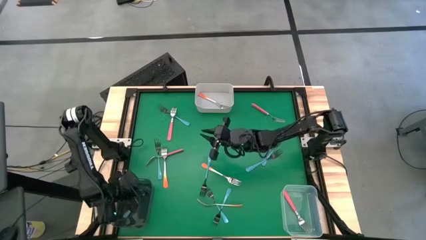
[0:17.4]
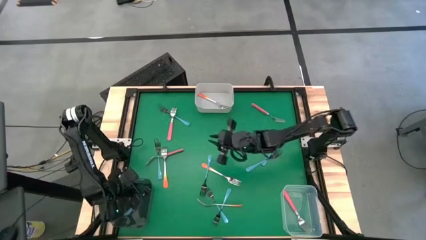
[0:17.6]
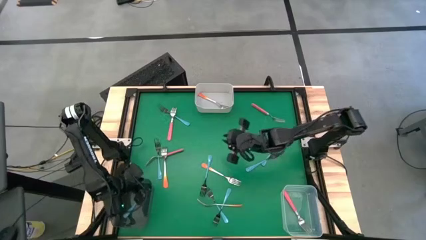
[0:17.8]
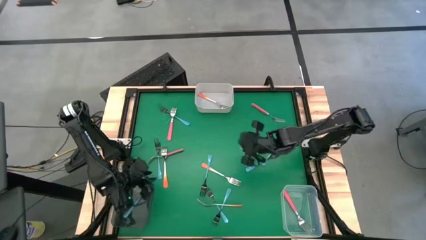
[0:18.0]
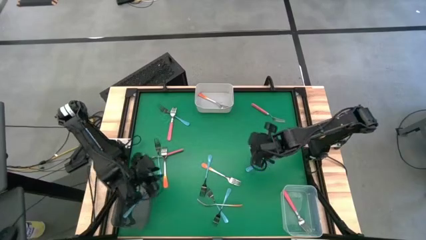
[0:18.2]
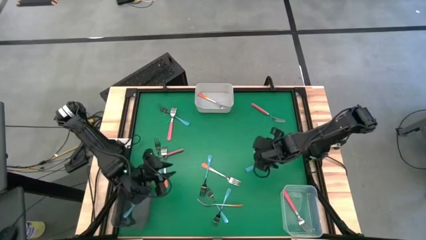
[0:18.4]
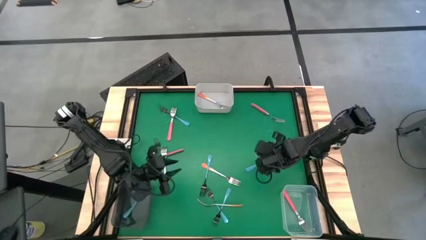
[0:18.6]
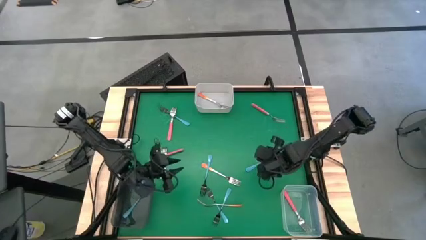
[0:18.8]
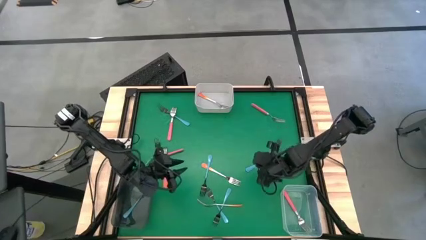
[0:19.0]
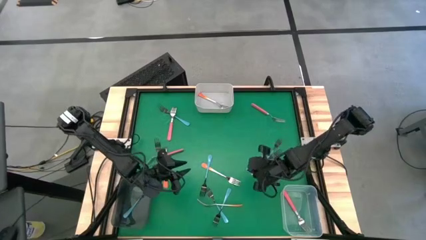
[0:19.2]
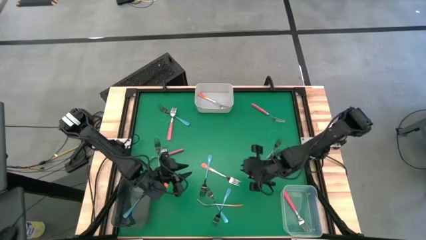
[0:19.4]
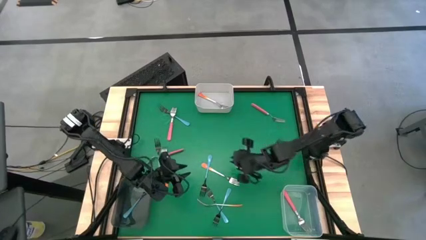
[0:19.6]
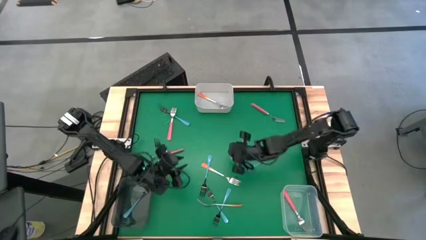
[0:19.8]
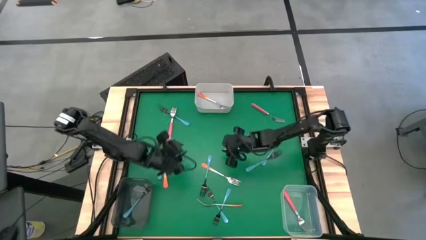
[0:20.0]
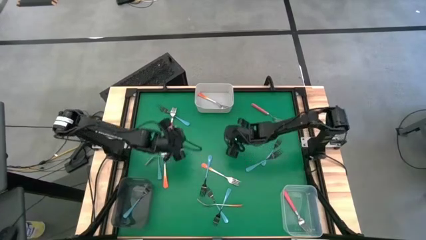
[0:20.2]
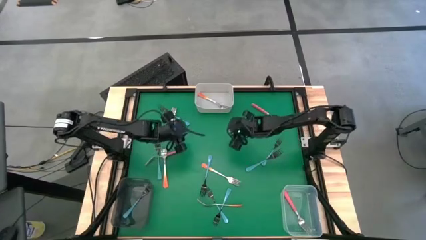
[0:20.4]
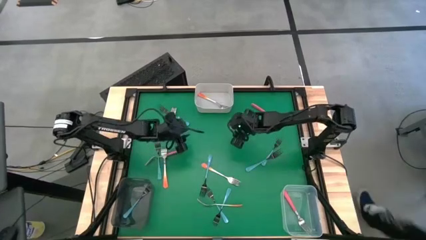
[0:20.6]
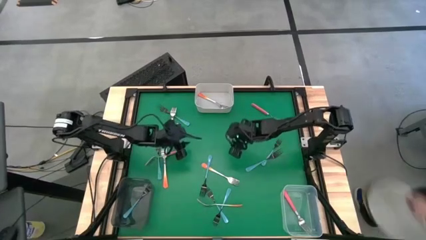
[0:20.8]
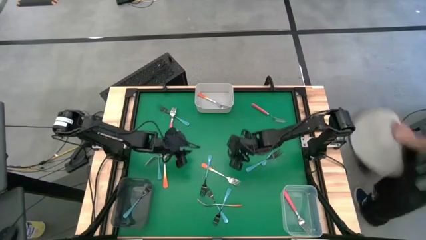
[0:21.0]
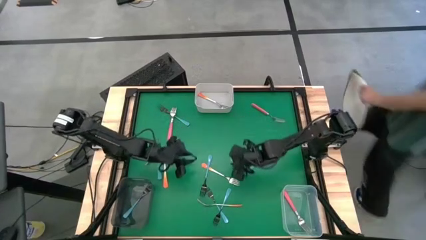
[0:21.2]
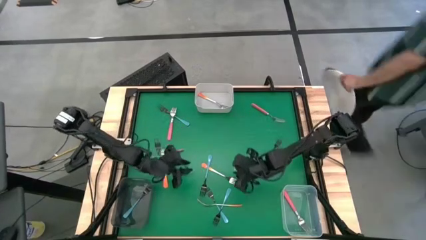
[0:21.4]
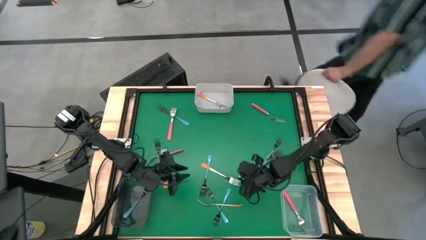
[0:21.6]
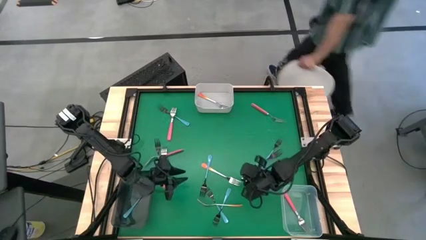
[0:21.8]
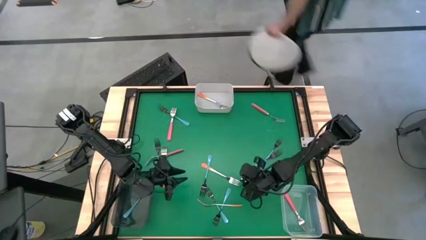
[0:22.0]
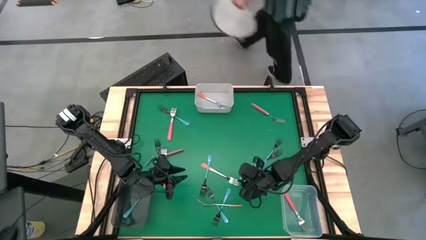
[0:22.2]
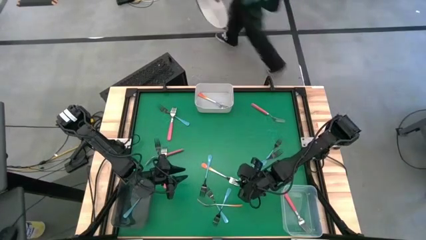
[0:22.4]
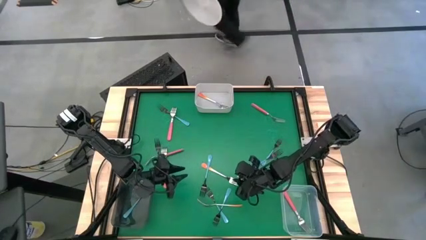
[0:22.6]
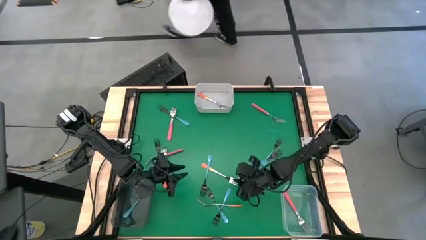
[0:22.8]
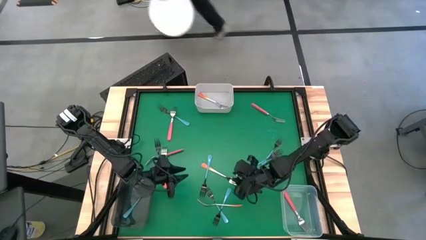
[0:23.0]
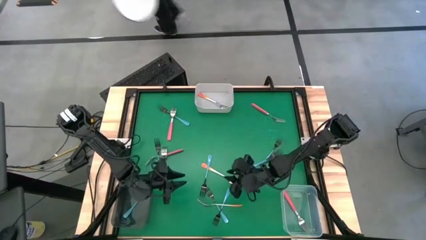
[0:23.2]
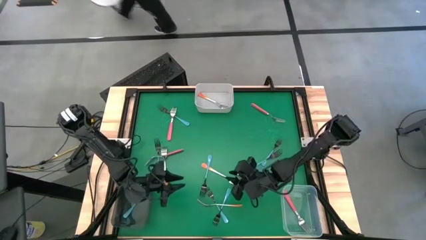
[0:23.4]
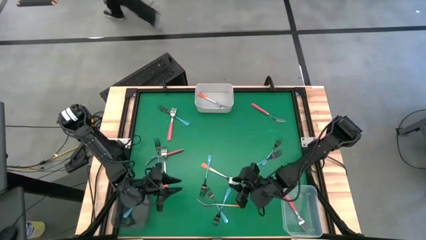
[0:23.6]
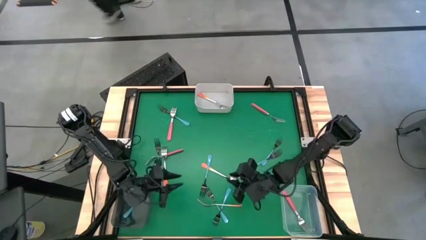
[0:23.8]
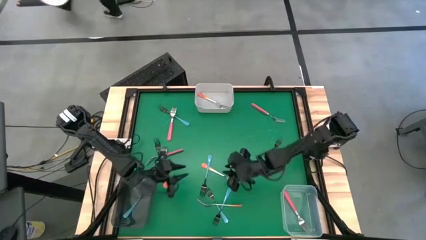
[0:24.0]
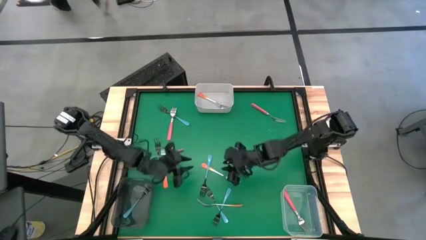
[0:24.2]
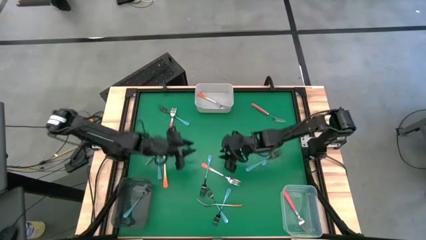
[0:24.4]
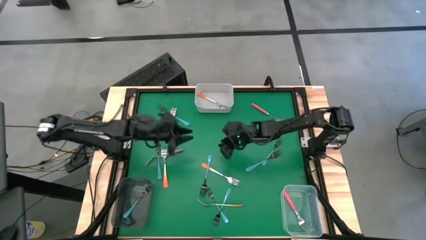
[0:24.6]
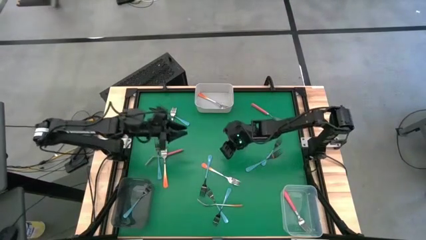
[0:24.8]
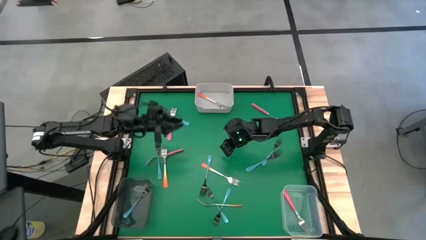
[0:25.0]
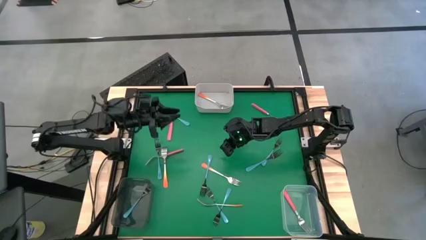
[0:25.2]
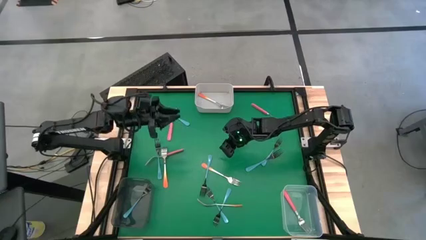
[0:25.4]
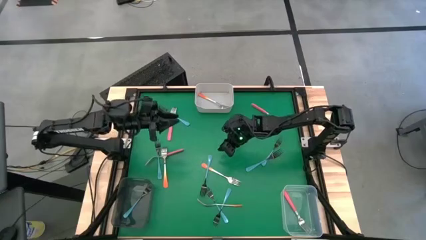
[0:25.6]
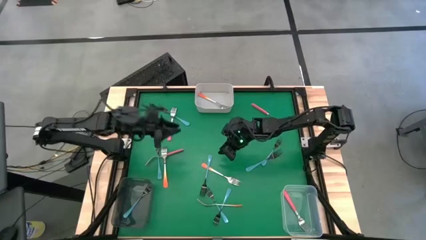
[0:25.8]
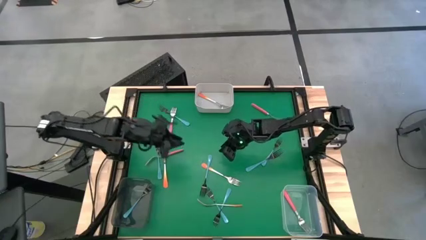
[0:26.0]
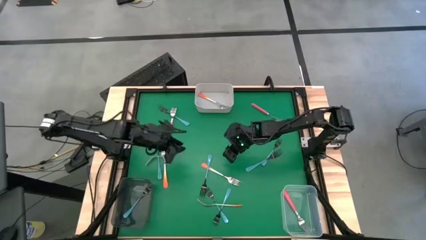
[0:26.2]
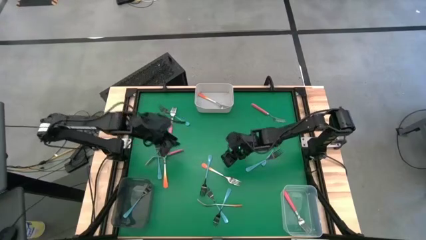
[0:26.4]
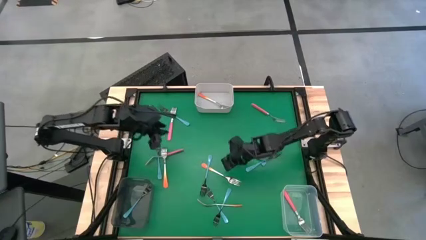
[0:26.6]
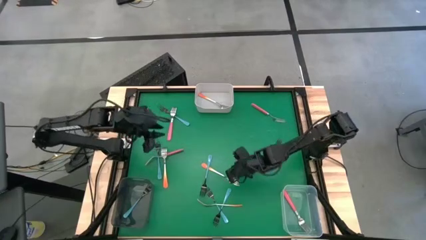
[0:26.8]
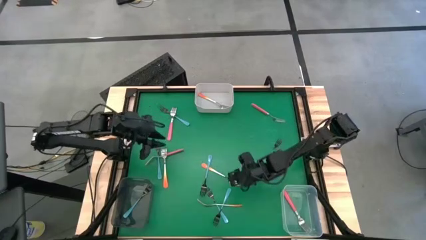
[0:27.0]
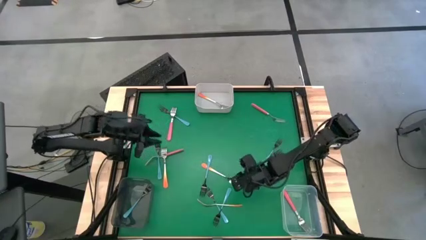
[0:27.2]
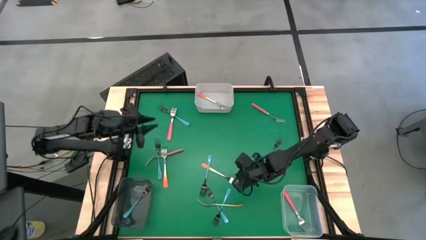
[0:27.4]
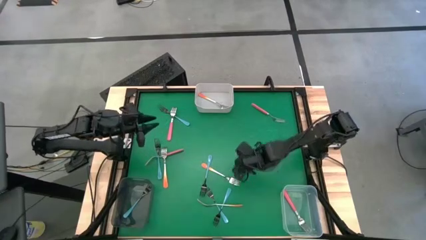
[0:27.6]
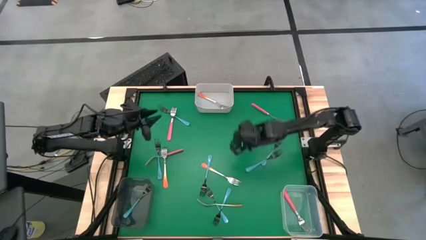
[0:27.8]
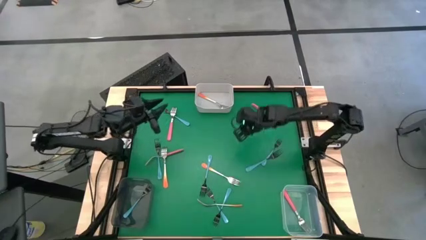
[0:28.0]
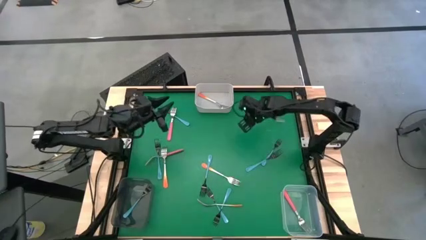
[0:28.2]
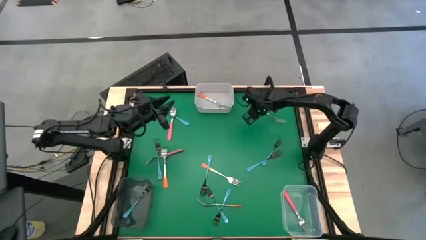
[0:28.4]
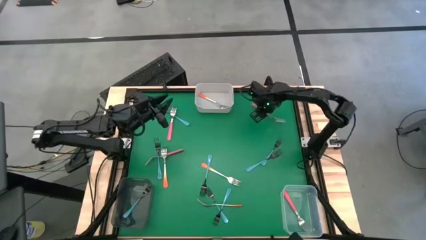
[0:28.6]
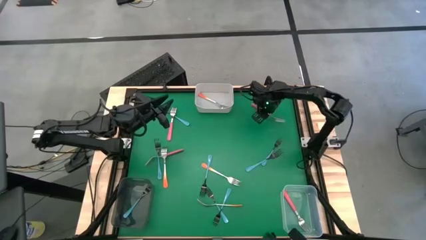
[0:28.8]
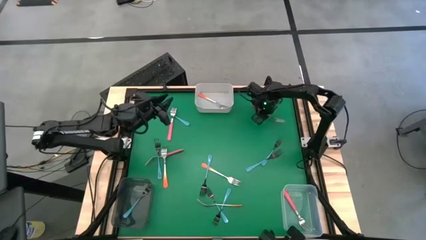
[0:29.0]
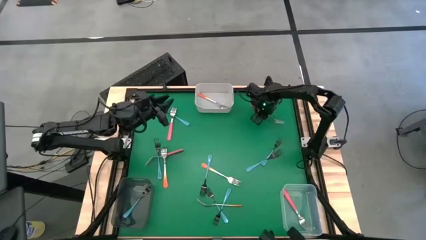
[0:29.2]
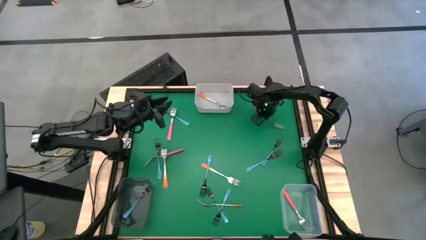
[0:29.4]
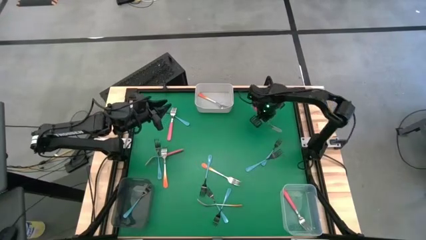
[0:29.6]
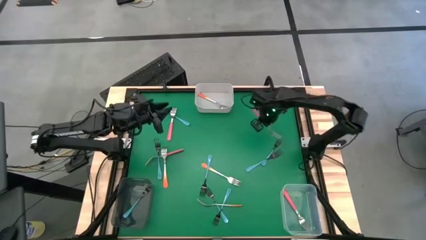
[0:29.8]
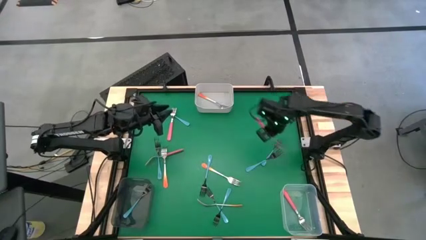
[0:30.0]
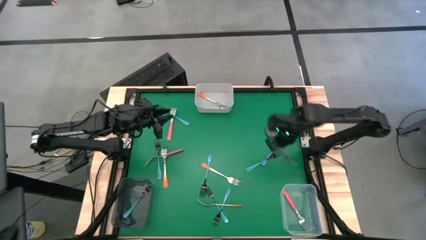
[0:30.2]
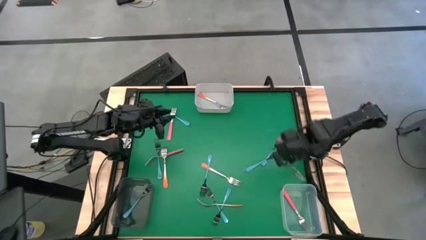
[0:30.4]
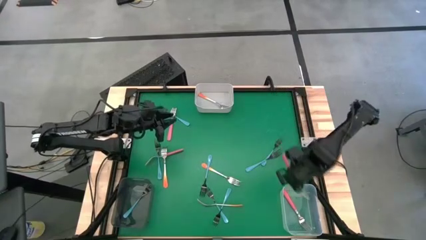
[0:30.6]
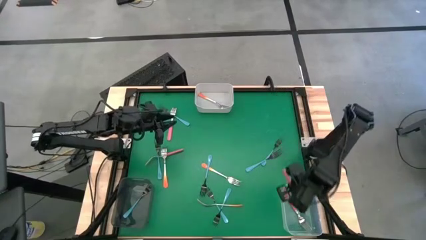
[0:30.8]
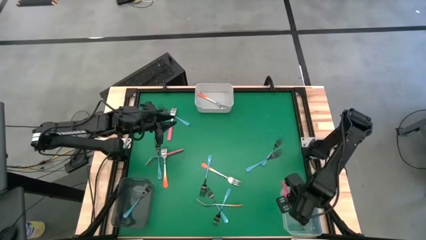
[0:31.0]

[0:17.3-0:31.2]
Task: Sort silverware by color (type)
Put the pink fork into the transparent bin
